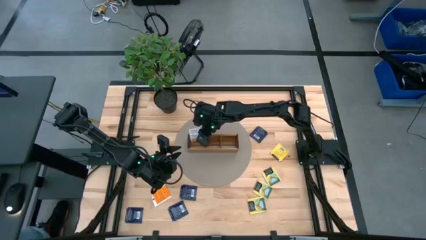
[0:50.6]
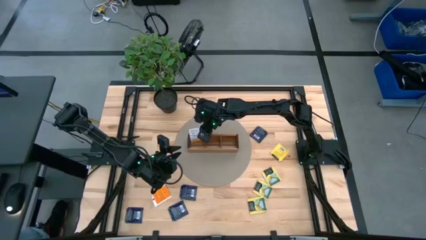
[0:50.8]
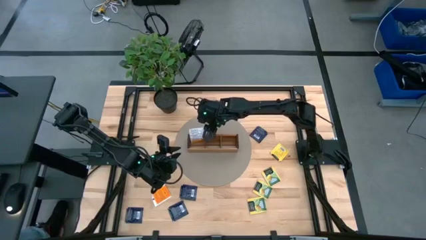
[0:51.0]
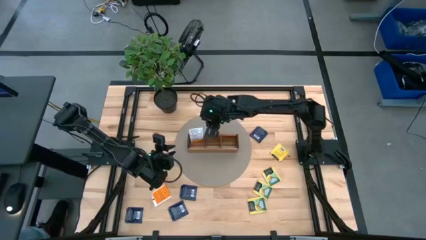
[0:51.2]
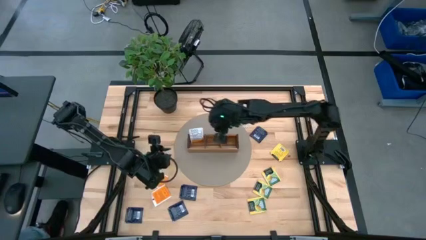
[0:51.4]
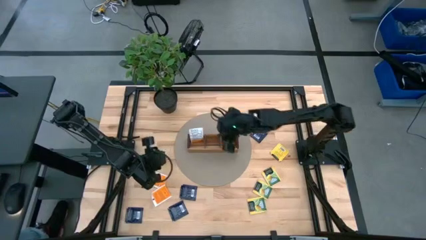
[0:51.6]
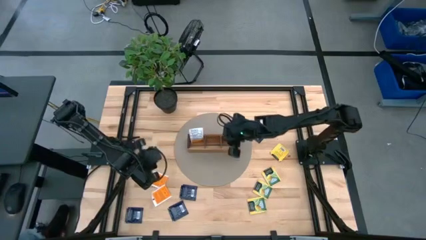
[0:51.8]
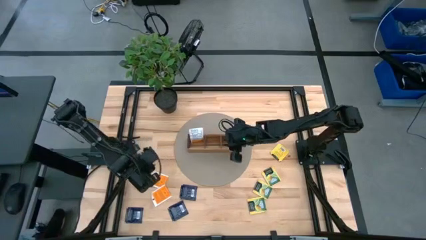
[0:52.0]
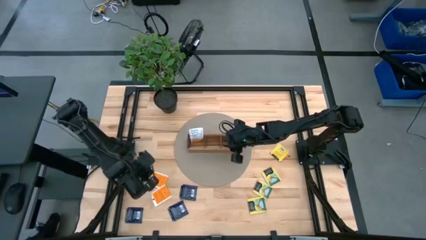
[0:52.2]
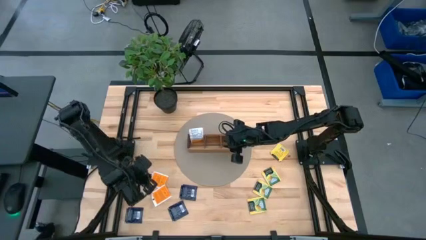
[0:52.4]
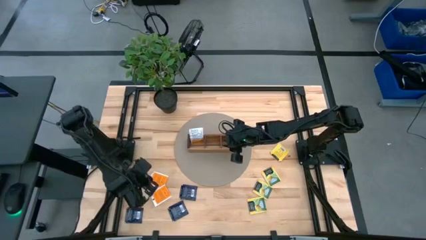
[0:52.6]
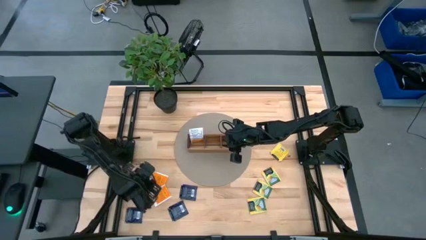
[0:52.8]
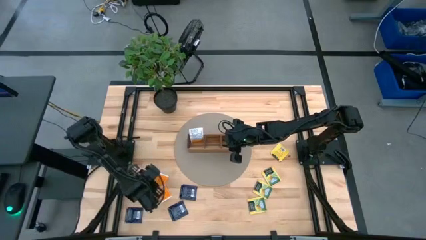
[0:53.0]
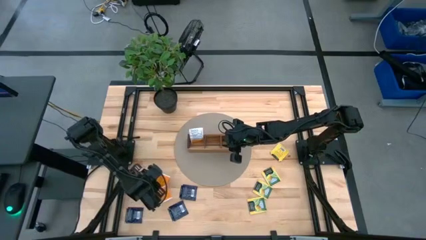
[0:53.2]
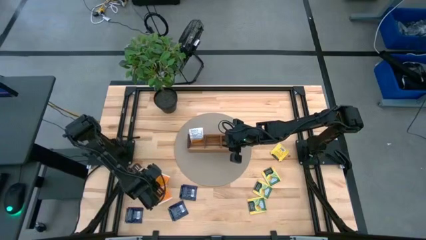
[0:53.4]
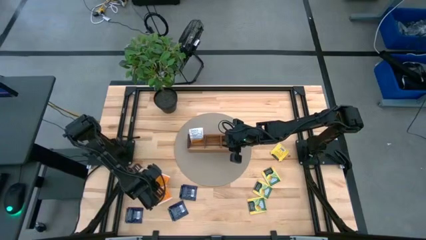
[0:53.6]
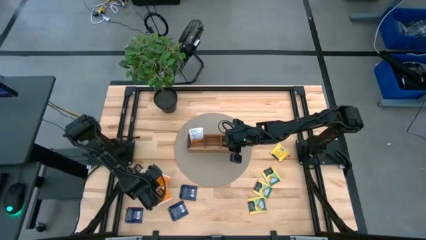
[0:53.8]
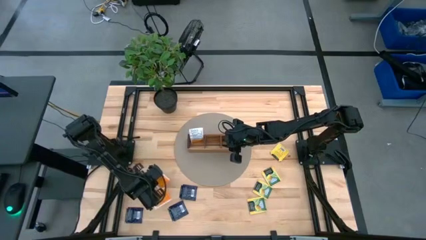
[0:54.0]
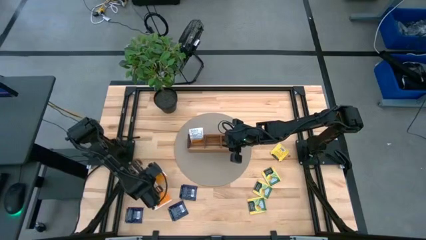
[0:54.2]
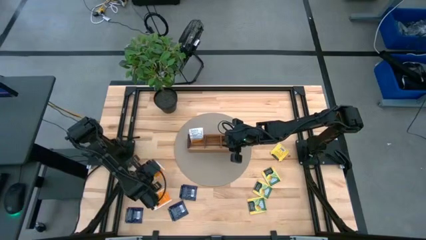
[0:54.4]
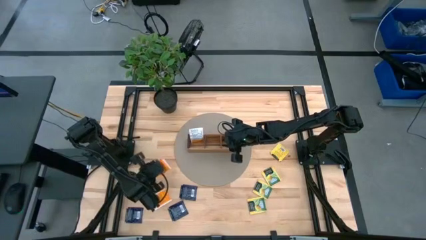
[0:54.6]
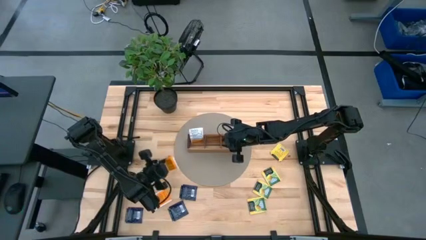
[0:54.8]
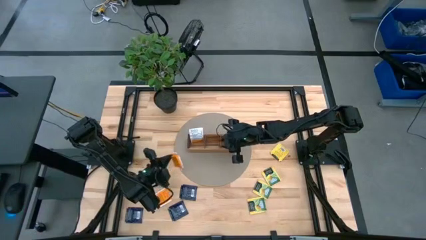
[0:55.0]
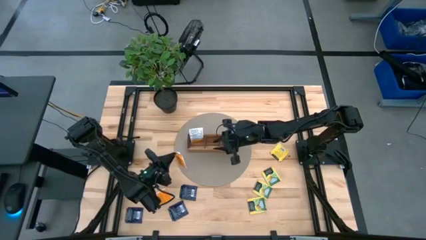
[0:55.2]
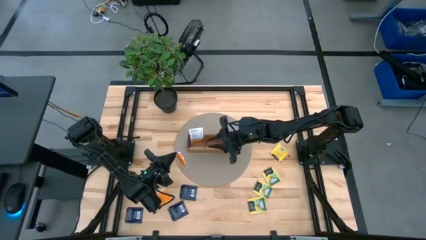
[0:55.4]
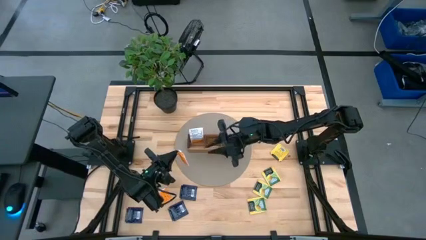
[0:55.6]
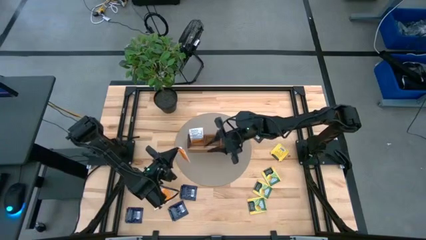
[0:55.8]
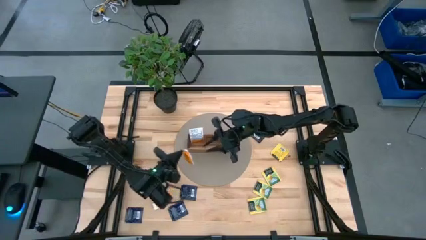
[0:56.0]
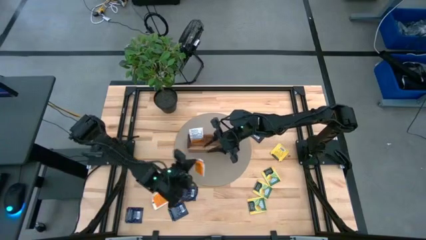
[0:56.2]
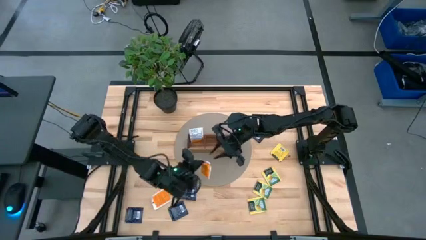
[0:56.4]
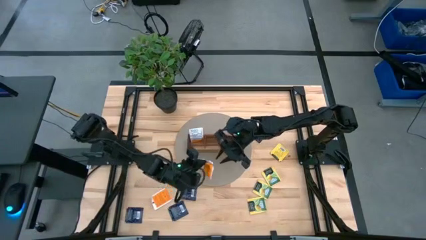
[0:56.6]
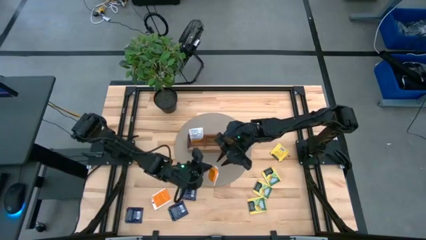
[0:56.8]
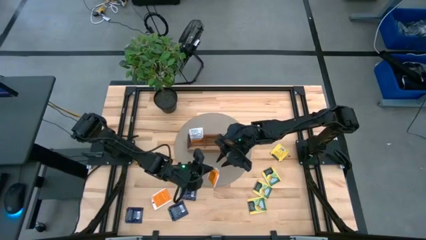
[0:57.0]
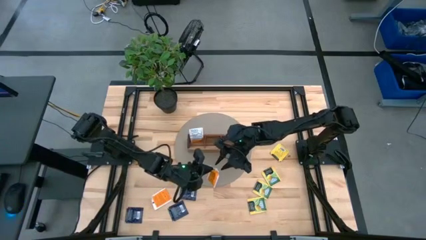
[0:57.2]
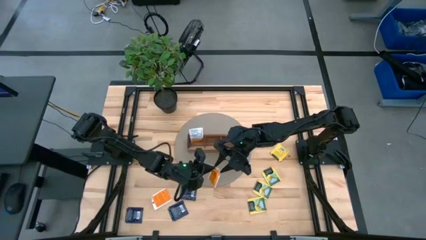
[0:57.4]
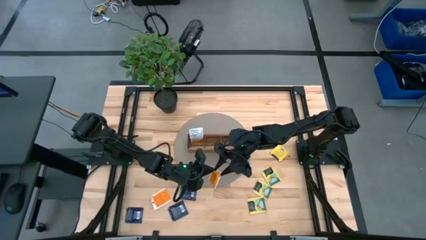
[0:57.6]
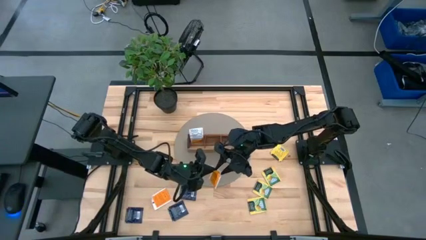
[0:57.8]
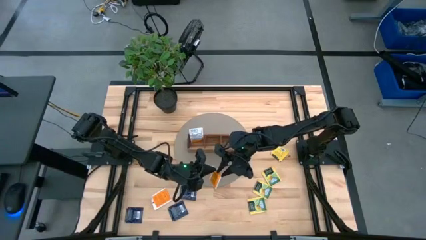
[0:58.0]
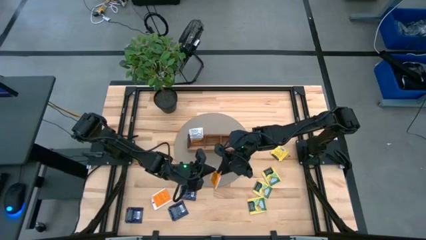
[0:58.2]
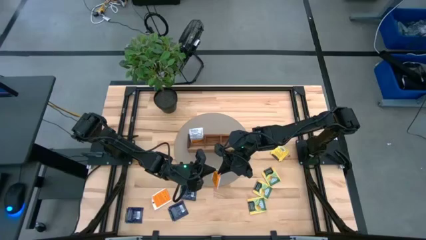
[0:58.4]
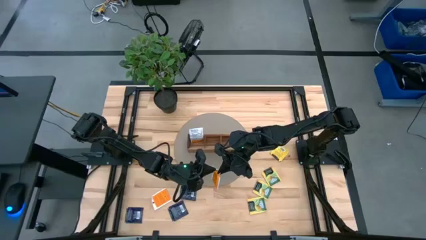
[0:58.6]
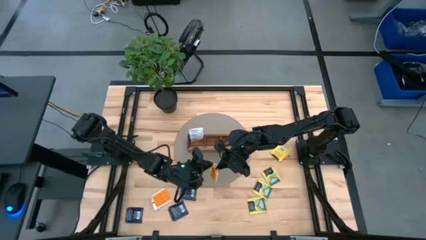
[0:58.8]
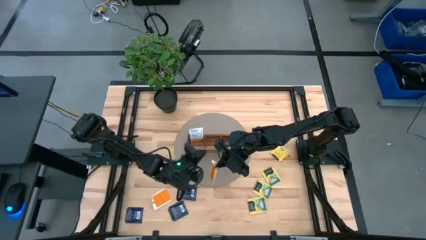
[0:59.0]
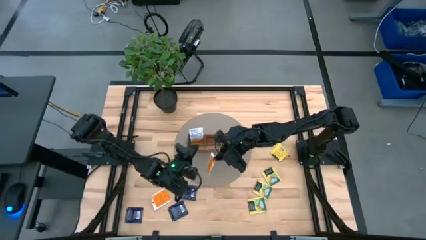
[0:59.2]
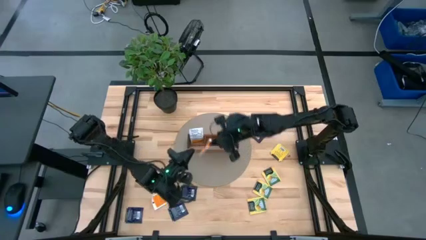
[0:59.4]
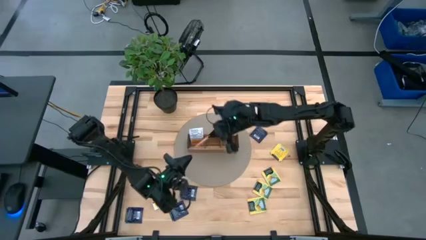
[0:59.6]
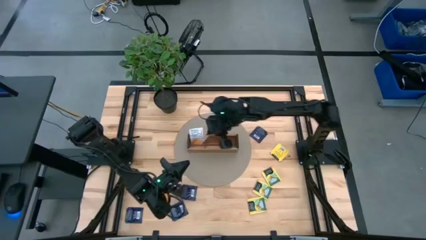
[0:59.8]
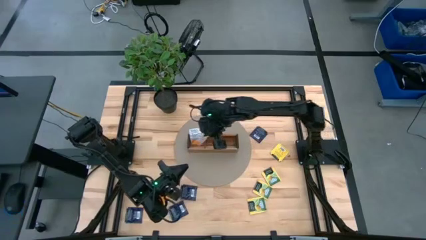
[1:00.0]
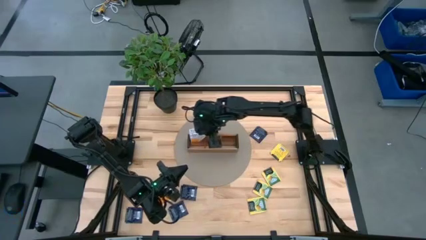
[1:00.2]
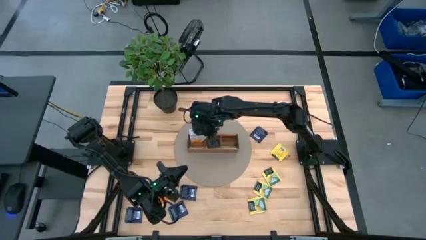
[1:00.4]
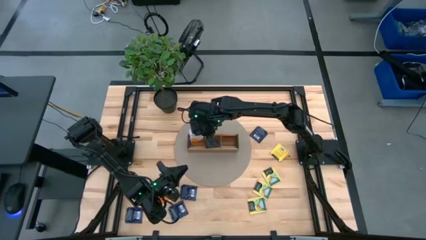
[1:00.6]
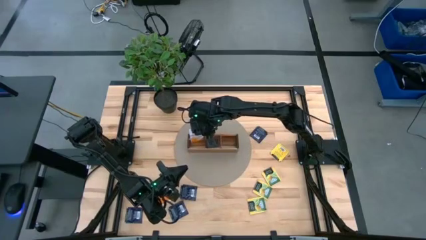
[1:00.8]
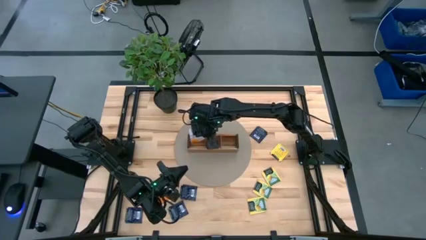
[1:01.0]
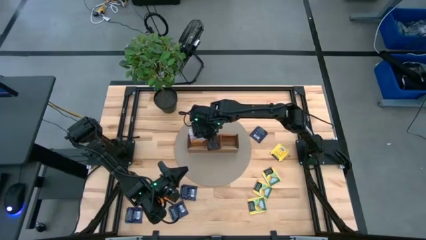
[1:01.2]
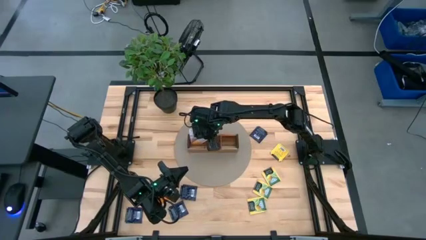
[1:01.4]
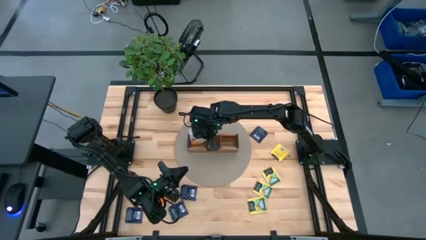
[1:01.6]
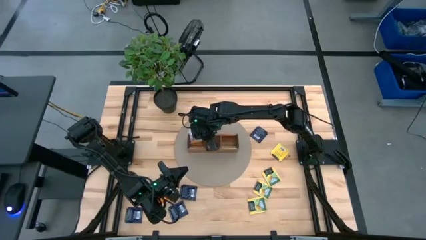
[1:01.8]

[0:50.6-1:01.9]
Task: Pick & Place Tea
Put the orange tea bag into the left section of the wooden organizer

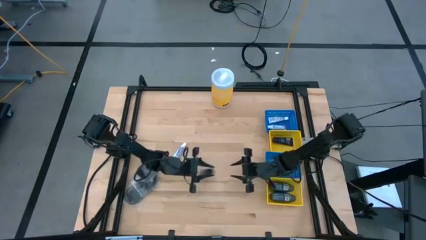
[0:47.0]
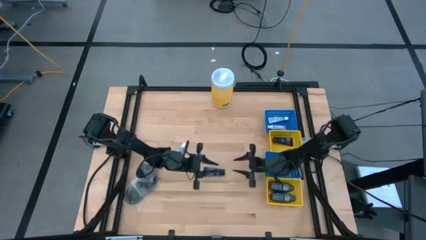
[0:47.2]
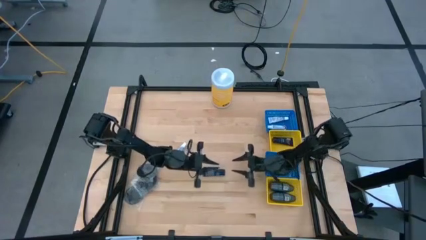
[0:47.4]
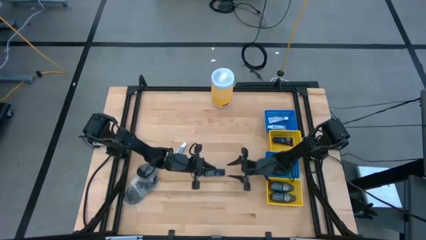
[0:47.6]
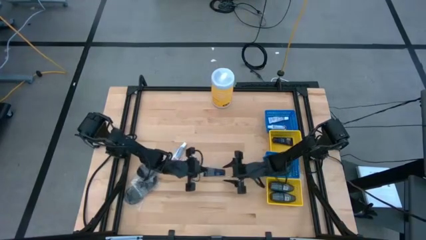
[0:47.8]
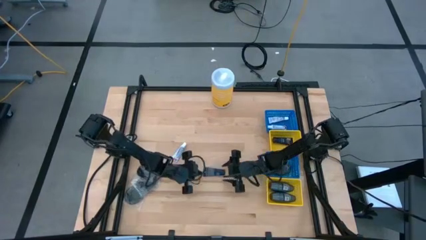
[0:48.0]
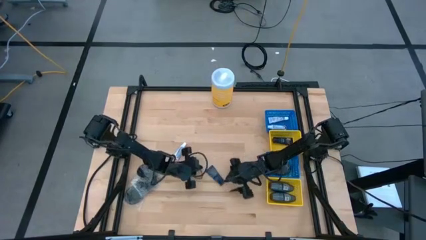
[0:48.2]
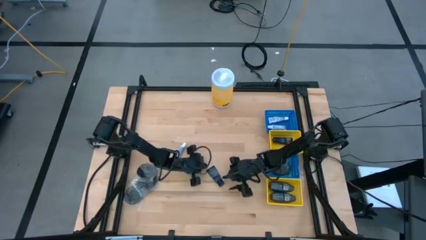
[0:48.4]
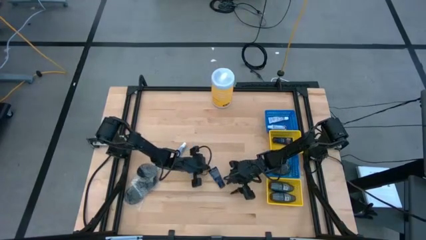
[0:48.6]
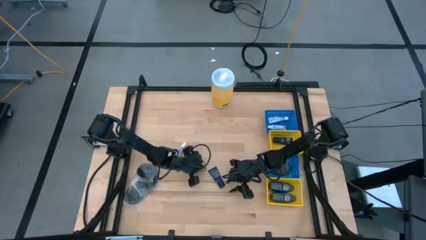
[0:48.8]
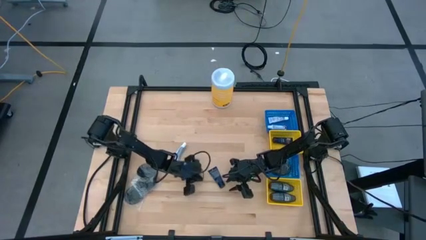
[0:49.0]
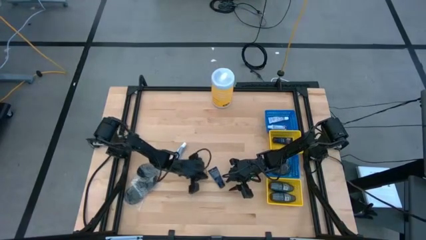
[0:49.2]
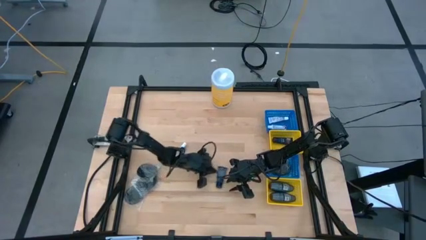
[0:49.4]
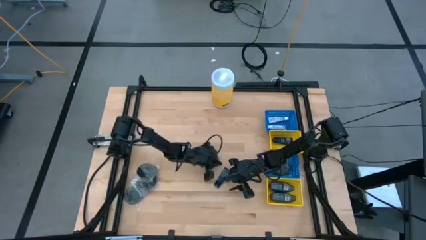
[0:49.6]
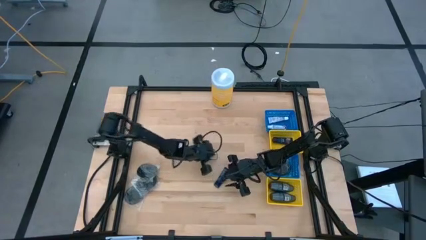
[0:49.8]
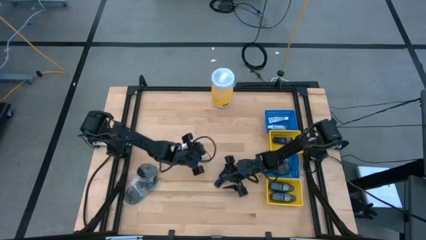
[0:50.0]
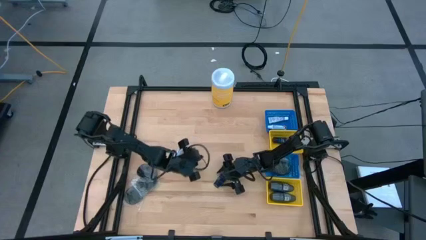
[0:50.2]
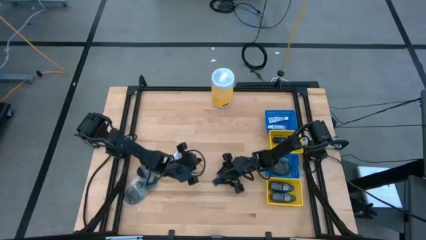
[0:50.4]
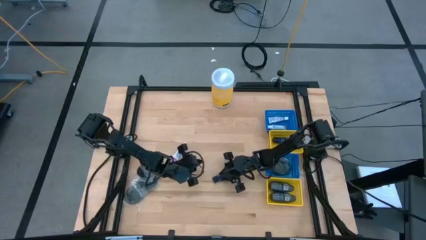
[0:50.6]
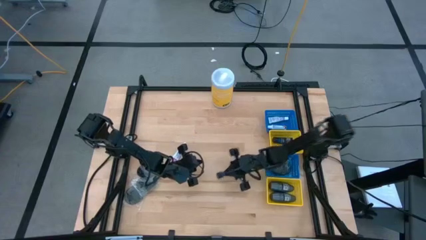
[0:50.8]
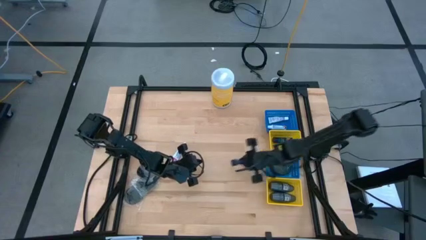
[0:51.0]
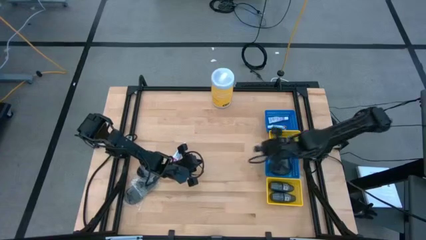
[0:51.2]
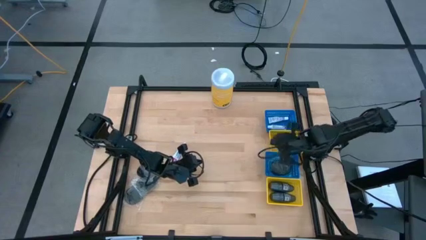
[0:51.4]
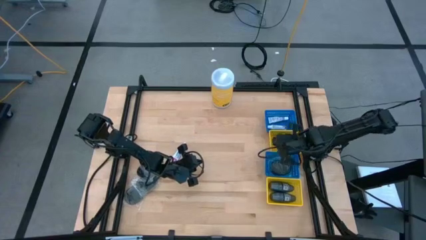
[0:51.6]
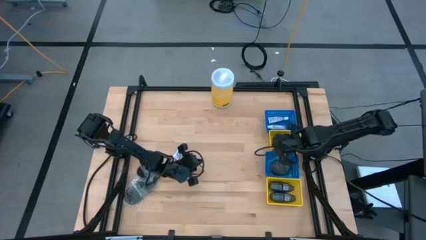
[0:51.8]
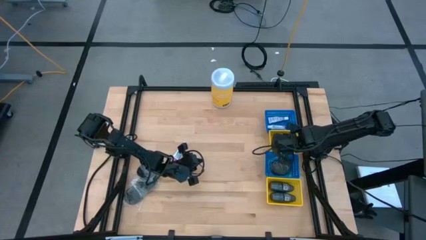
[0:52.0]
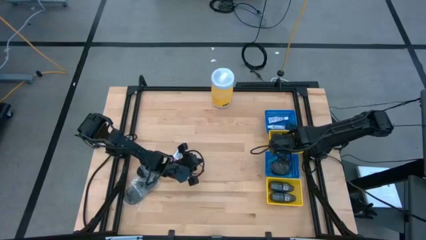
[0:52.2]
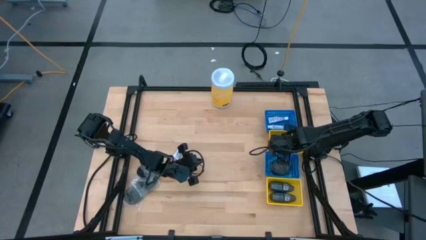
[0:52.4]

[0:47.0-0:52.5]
Task: Pick & Place Travel size toiletries
Put the blue shave cream into the top yellow bin
